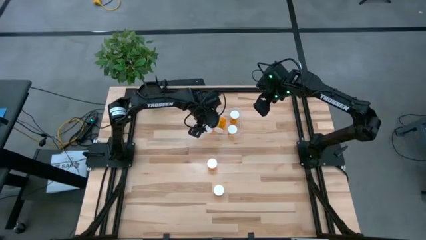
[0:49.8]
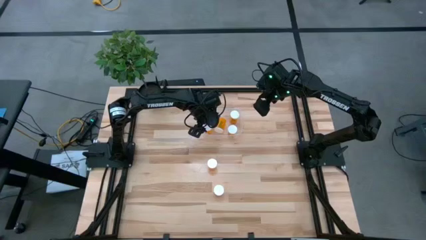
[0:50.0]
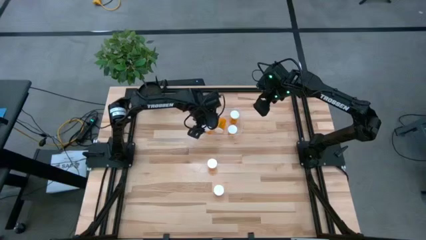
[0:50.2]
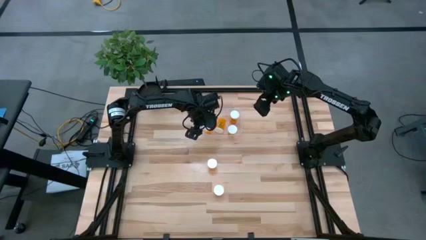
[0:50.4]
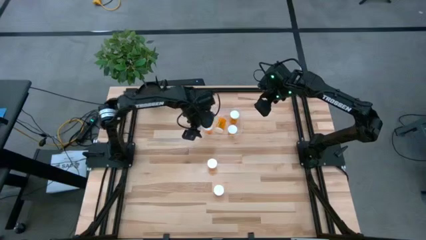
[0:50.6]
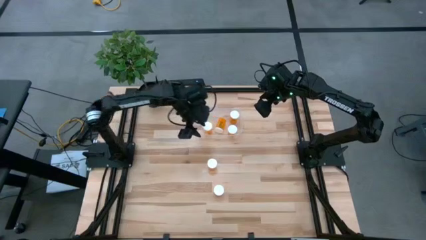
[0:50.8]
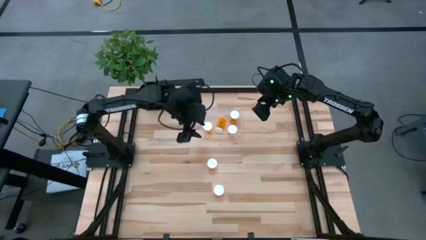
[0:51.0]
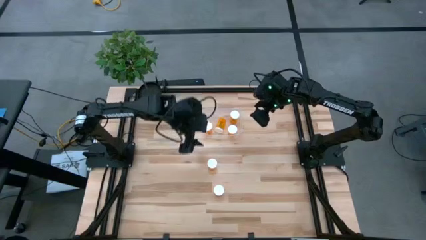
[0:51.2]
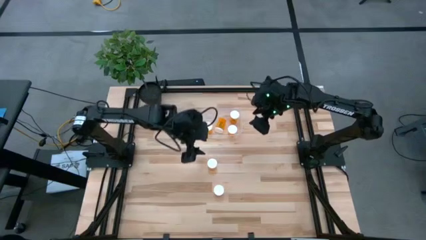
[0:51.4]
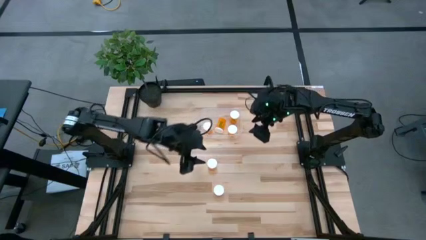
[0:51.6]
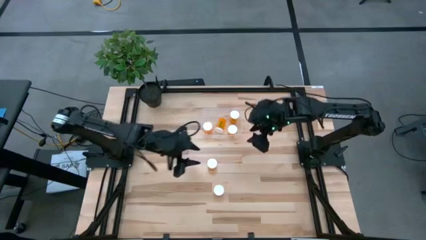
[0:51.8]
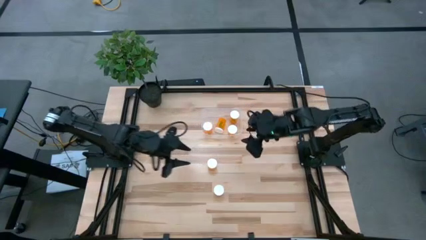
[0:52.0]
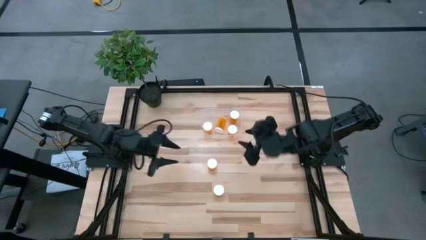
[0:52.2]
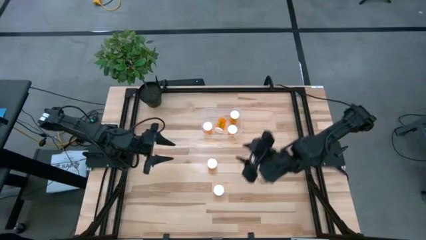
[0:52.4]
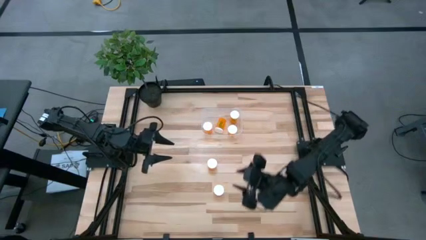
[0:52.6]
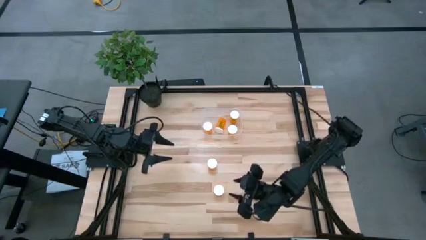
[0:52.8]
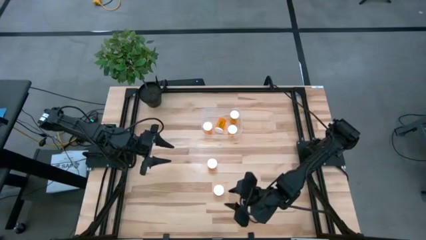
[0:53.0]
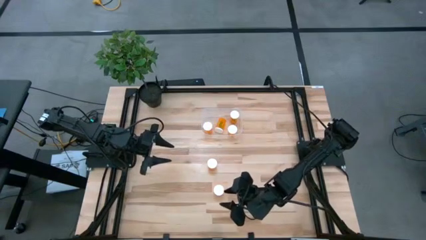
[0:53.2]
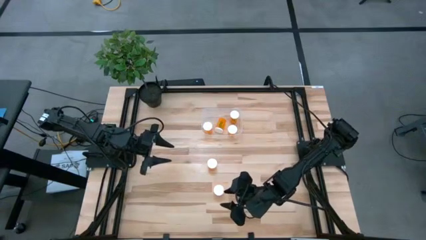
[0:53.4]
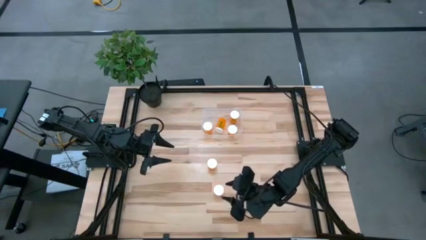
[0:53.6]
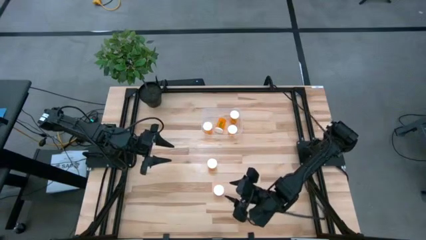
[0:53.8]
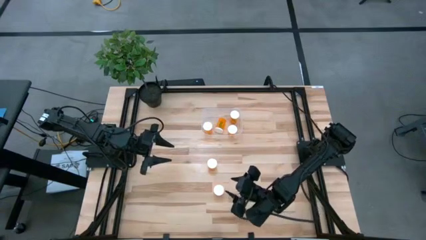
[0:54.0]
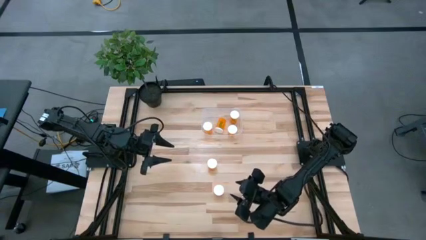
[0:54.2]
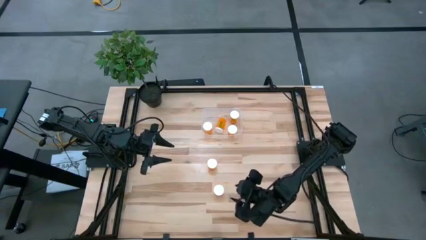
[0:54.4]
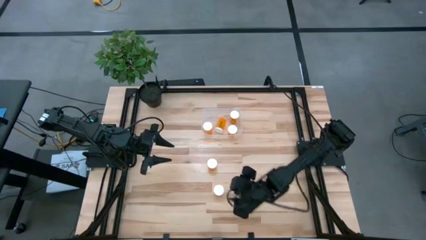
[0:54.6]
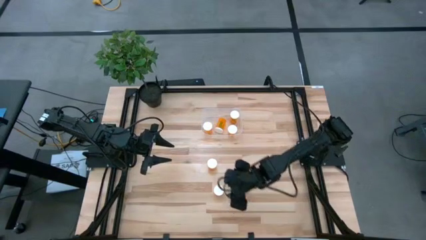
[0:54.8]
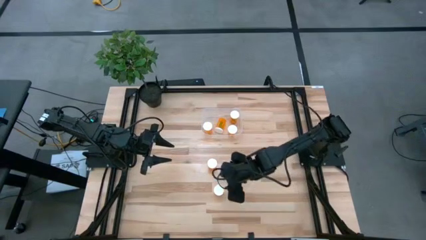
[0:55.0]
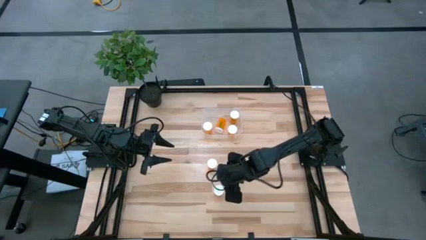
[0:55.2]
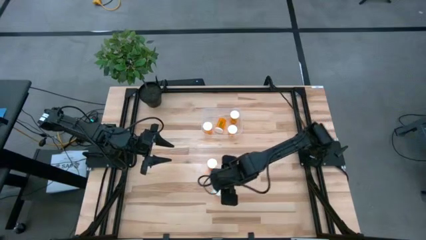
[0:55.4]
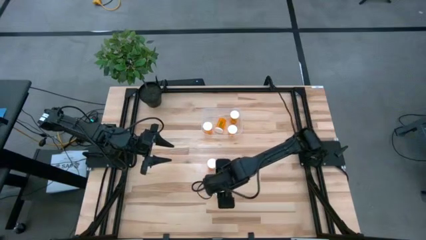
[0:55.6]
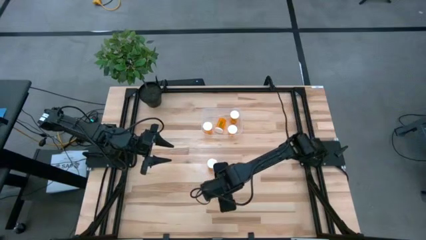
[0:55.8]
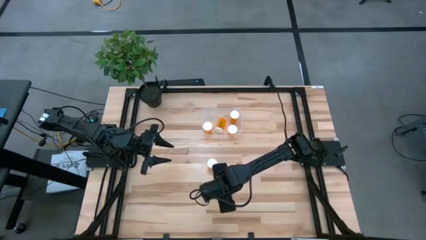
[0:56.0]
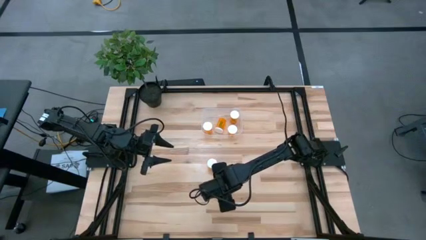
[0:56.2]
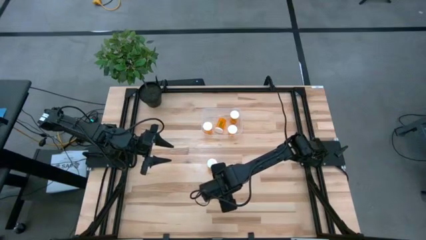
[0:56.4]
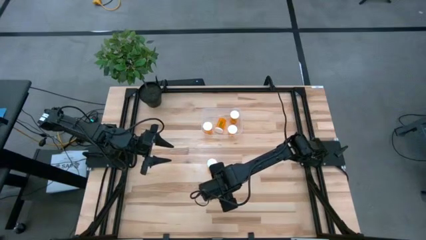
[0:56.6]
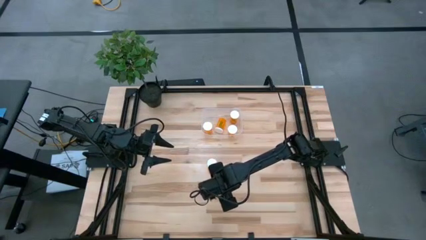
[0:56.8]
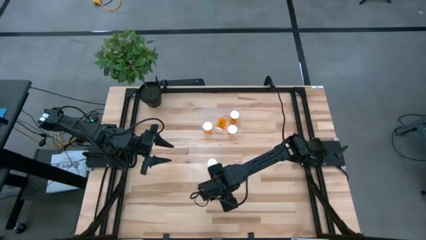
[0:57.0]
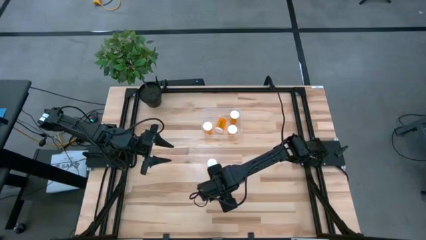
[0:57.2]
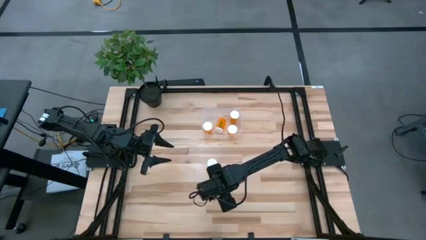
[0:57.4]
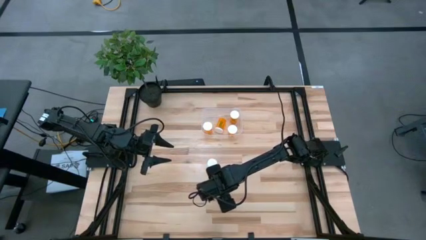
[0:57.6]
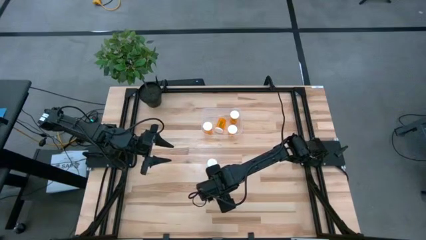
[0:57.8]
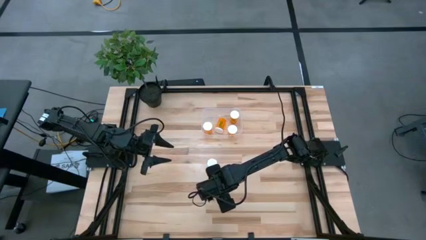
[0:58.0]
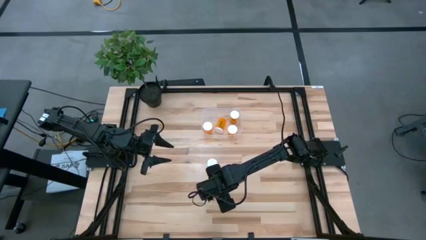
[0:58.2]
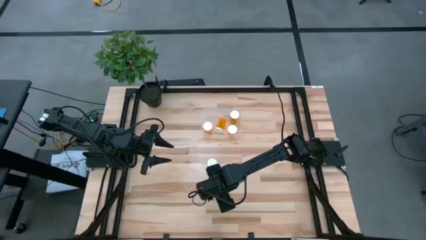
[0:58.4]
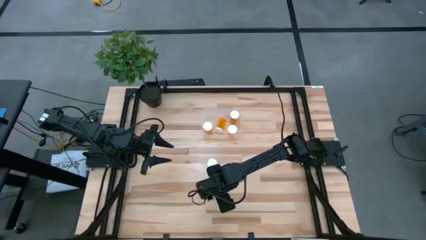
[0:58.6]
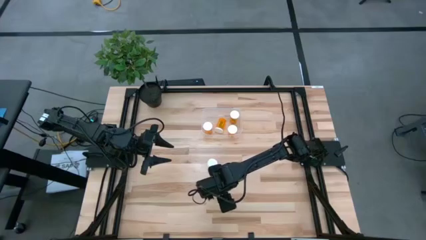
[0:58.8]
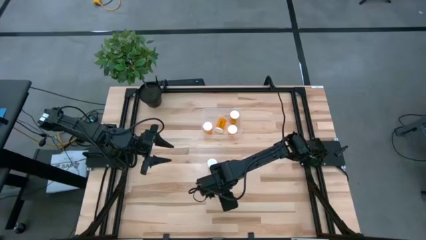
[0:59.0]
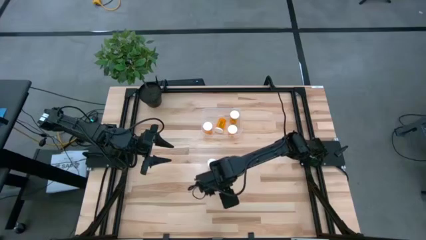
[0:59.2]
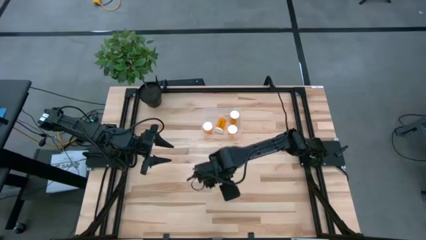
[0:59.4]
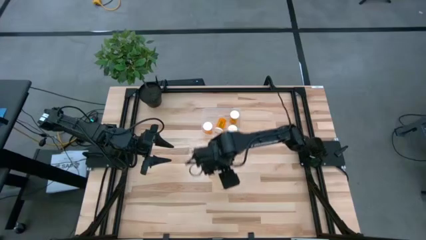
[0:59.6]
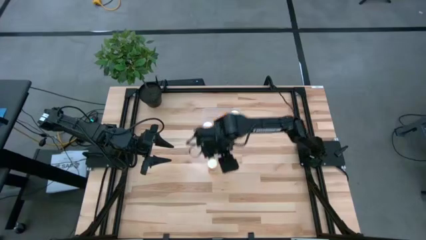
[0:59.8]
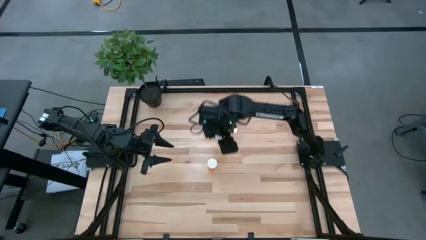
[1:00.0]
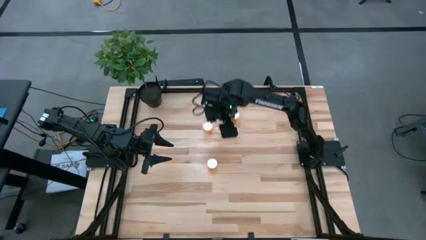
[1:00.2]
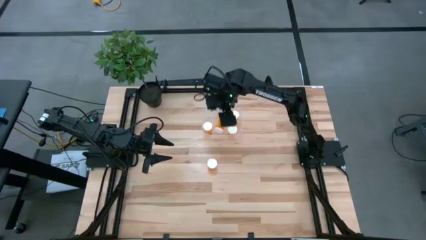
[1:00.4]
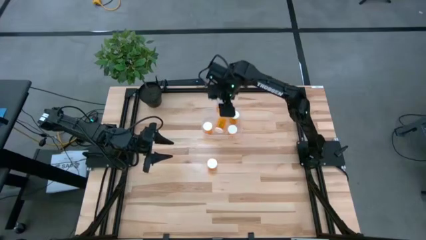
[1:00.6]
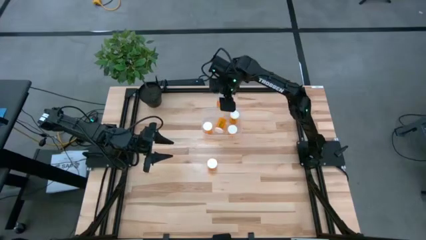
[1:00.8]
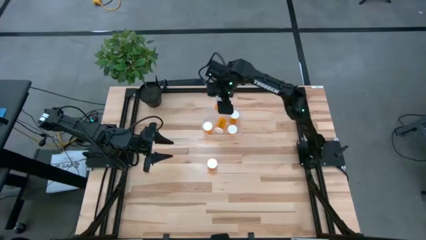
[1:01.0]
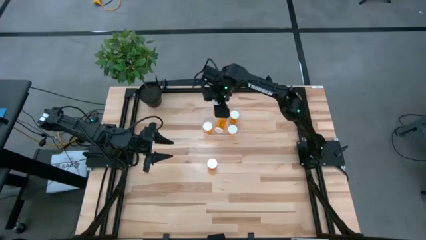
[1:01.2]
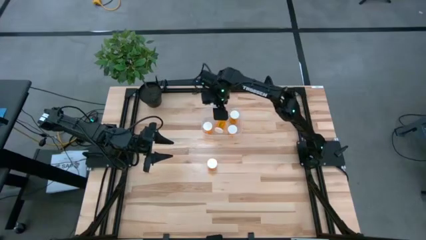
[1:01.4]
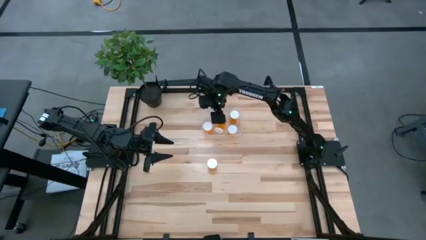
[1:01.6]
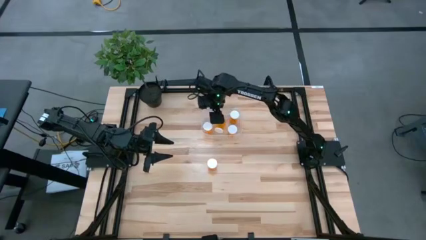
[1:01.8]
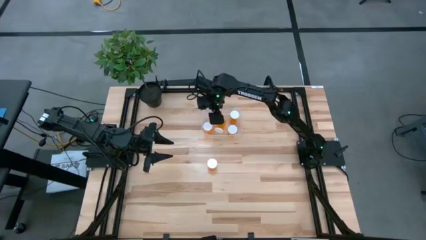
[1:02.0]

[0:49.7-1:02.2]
Task: Pick and place pill bottles into a basket
Put the orange pill bottle into the transparent bin
